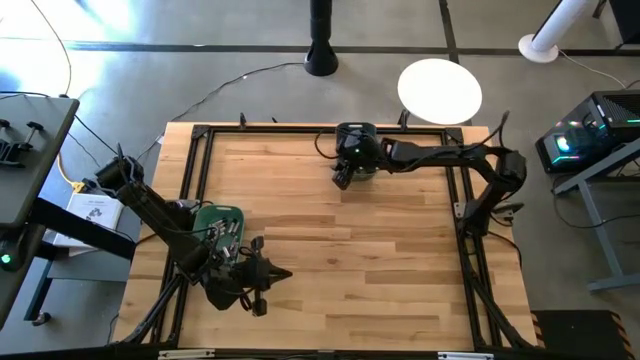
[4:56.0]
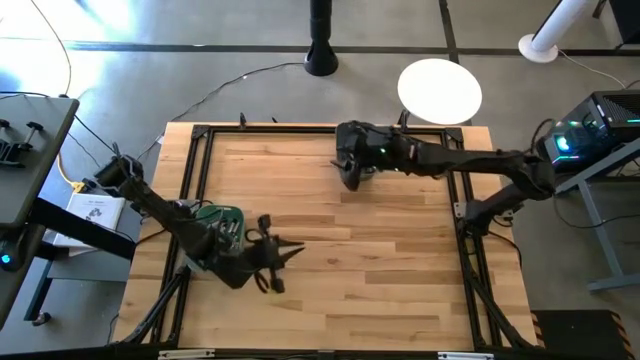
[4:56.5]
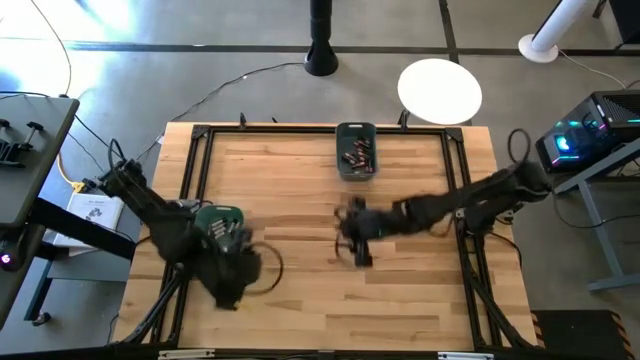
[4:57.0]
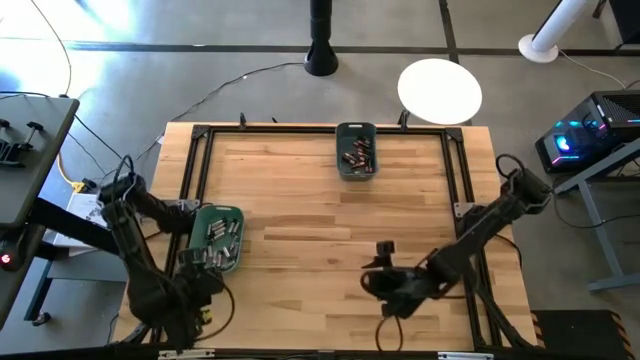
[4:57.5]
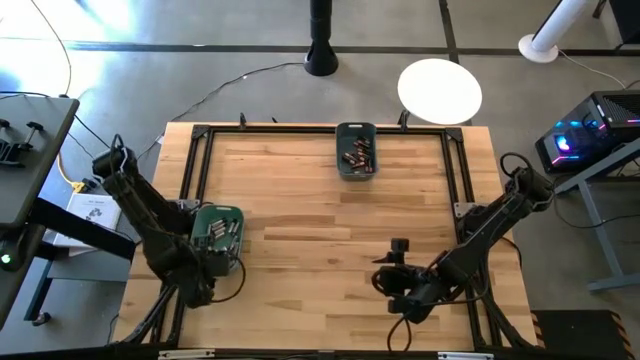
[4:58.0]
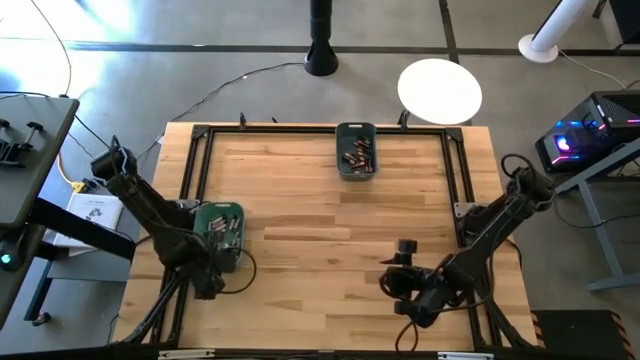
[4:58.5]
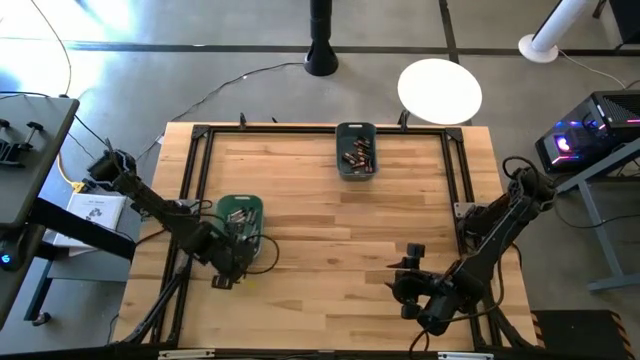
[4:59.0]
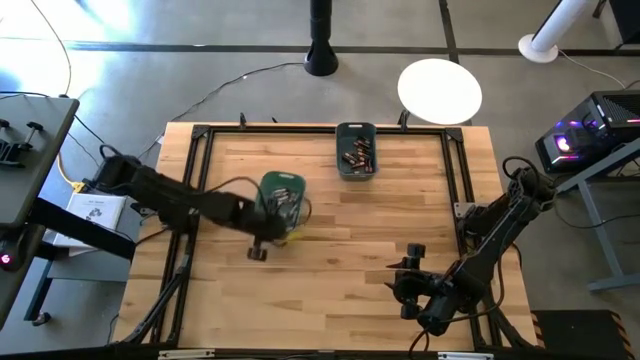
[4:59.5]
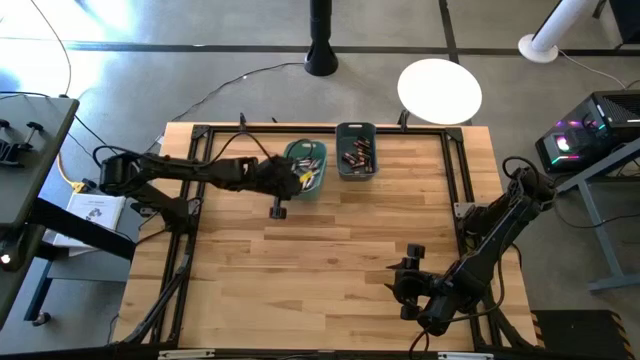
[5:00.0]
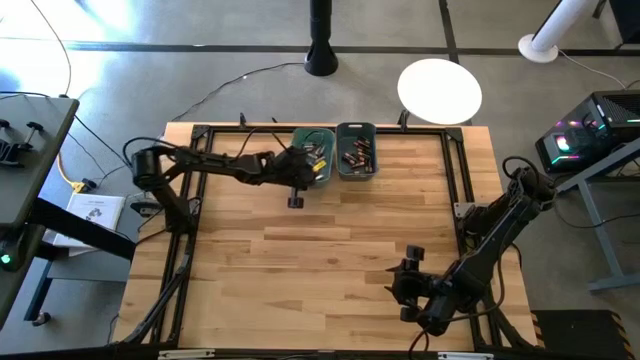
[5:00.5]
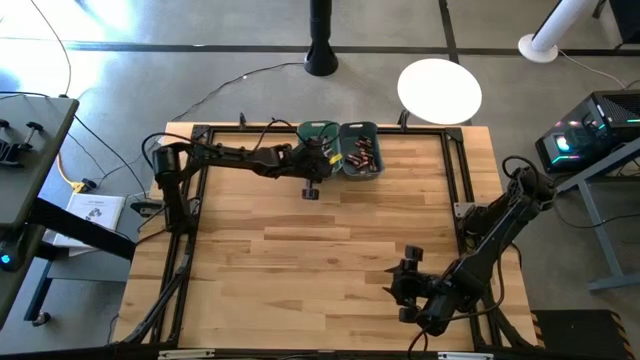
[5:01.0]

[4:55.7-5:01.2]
Task: Sort batteries
Move the green bin to the top of the table

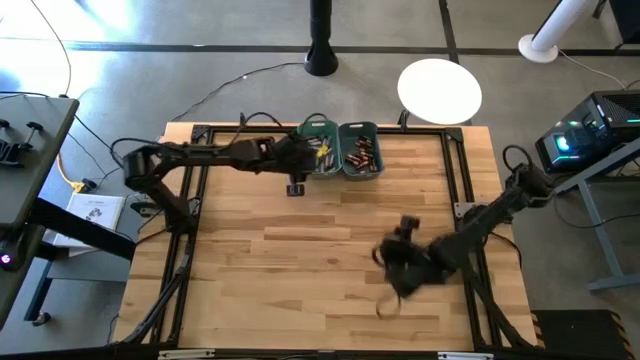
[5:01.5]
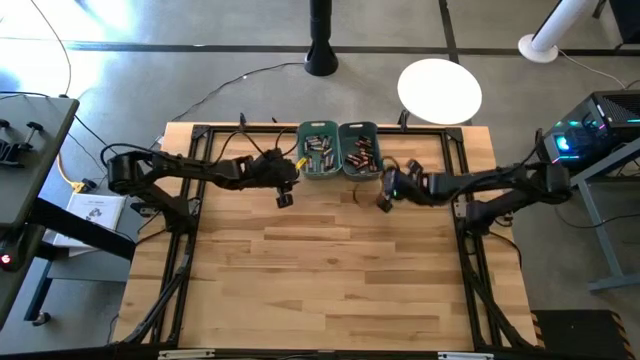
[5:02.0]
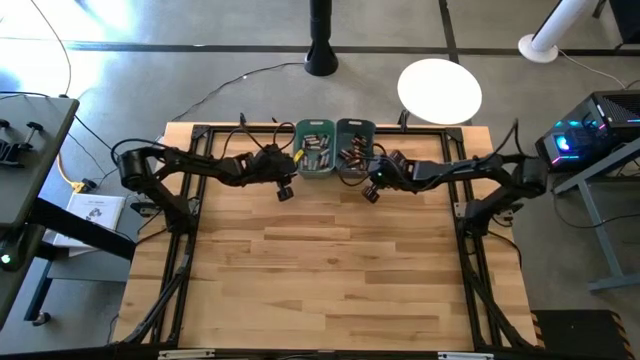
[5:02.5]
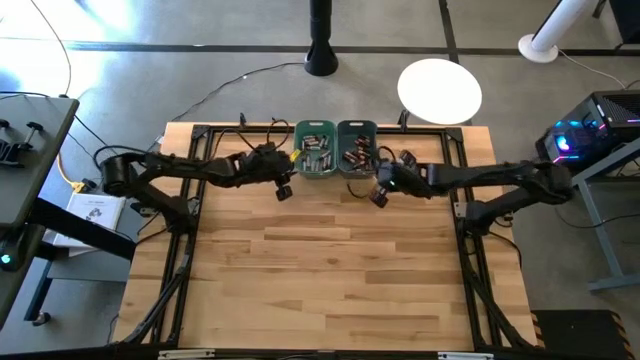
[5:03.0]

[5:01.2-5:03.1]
Adjust the bins

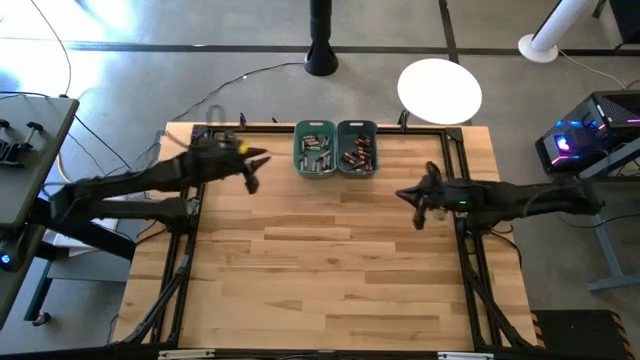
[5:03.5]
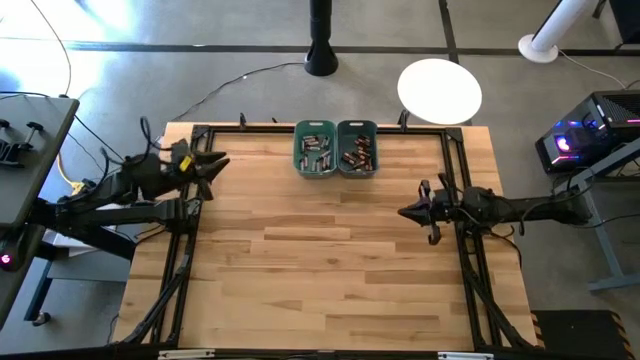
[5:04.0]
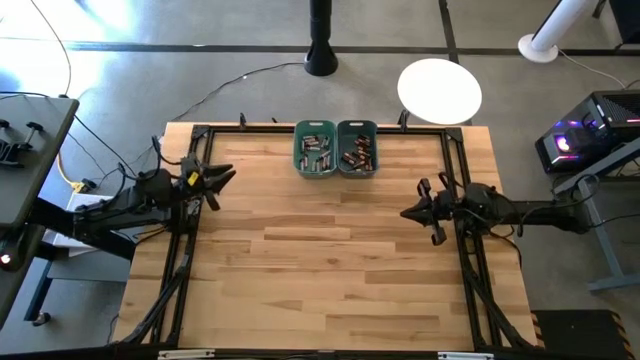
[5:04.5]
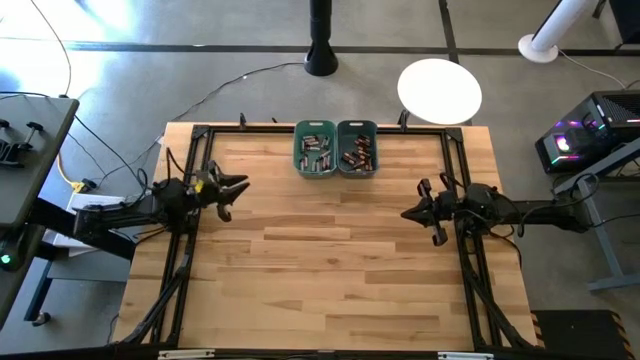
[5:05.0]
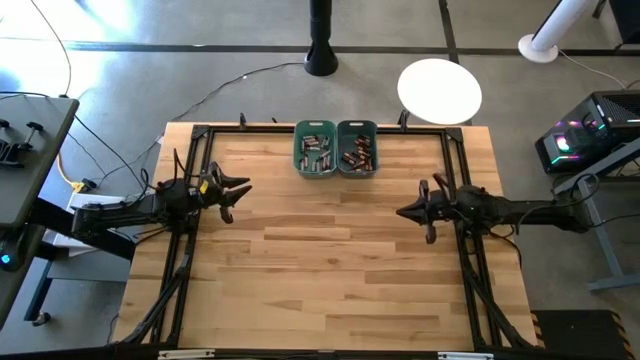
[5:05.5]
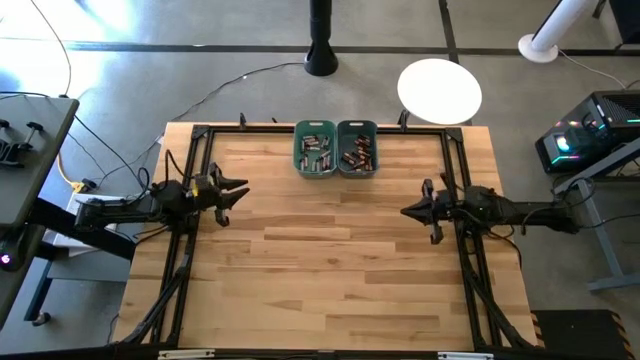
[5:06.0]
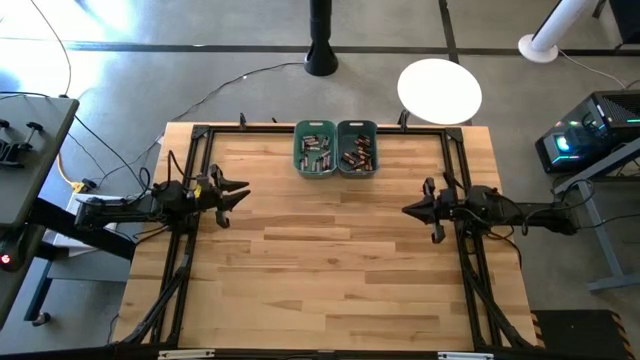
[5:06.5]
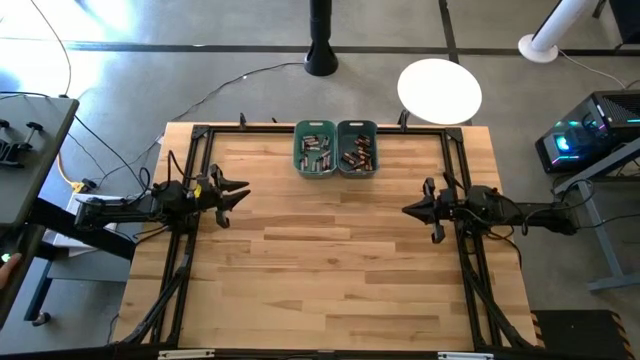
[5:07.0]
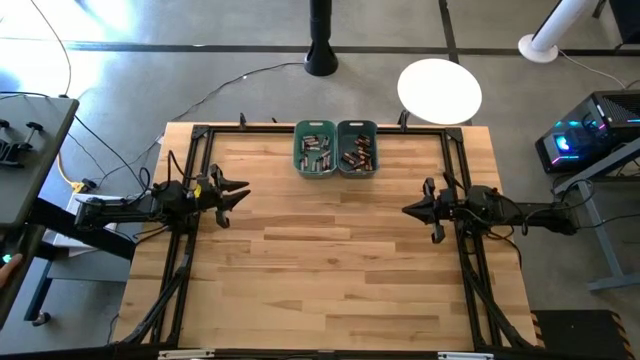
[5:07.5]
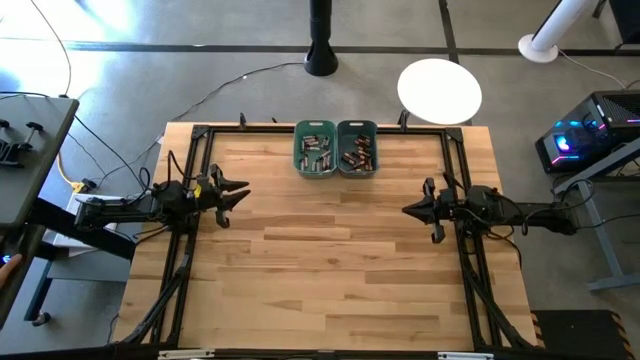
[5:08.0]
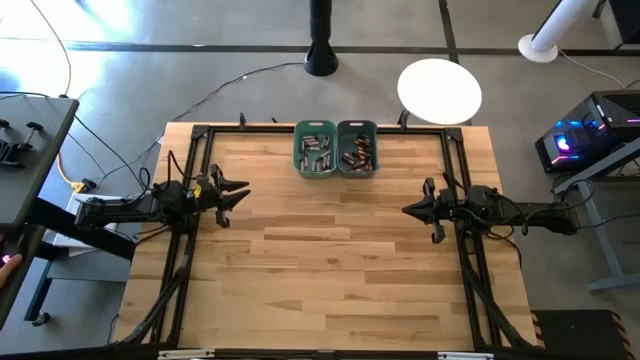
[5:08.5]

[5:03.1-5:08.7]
Return to Home Position

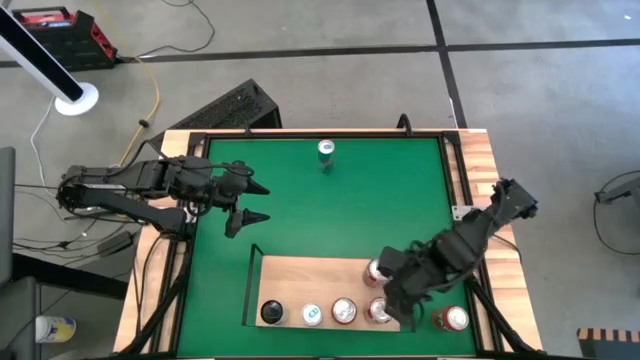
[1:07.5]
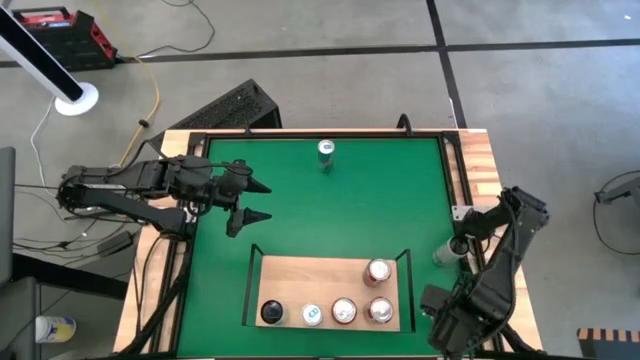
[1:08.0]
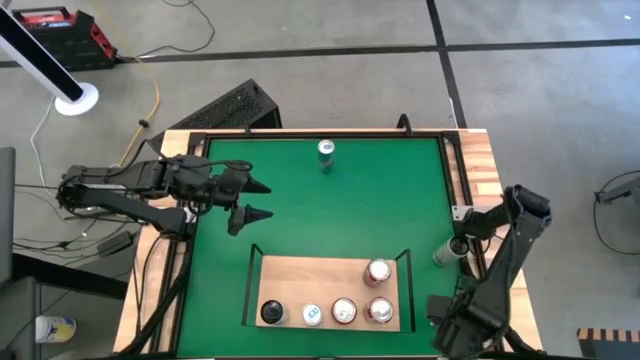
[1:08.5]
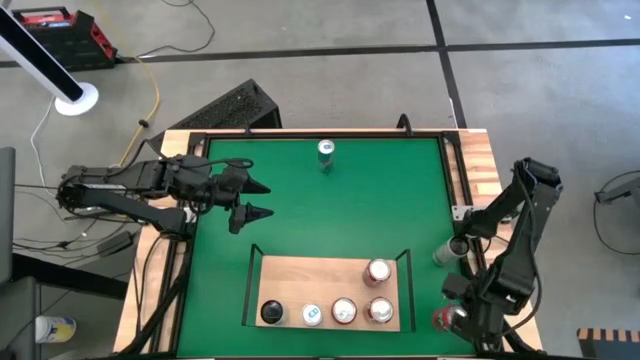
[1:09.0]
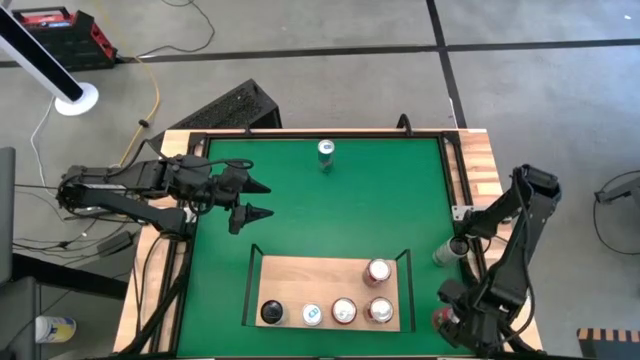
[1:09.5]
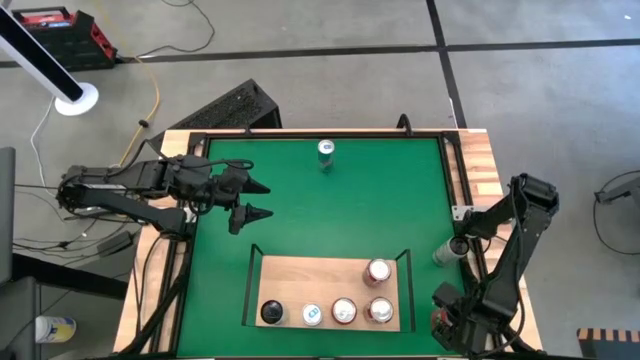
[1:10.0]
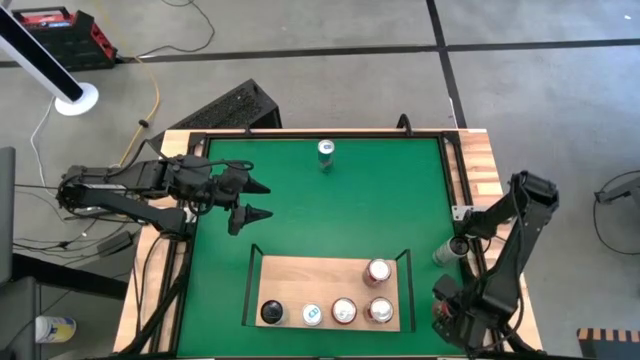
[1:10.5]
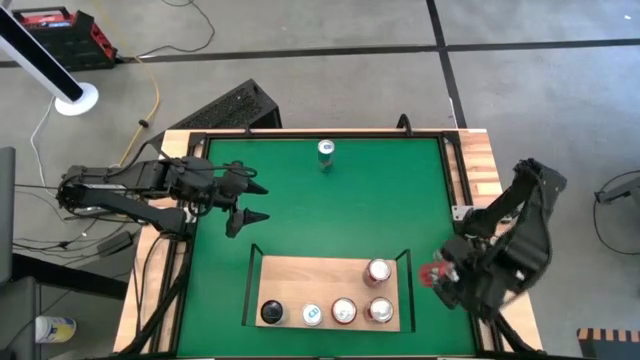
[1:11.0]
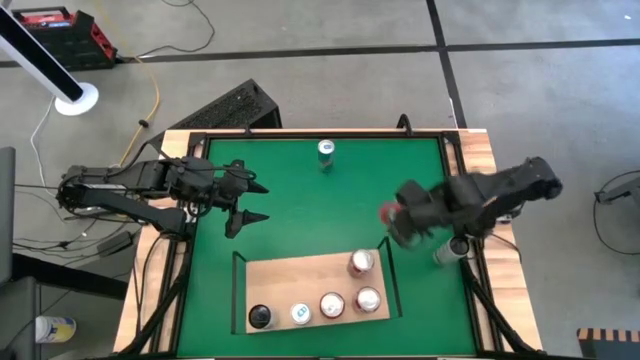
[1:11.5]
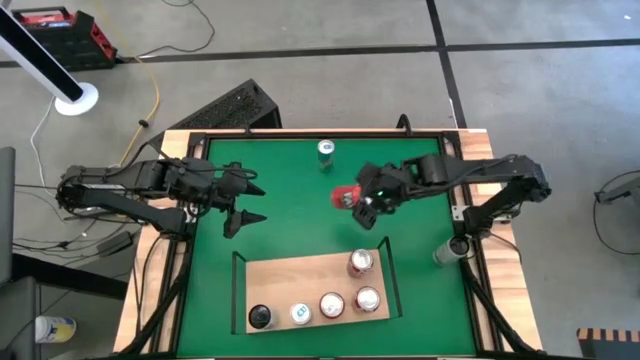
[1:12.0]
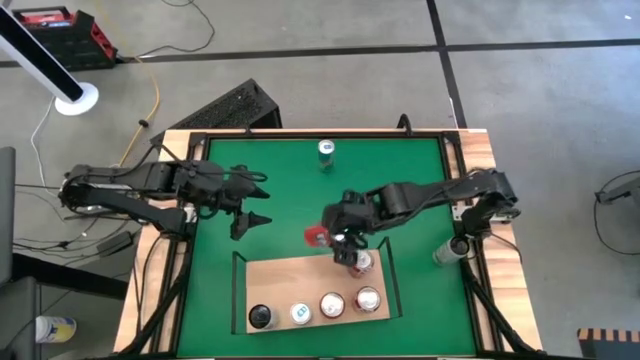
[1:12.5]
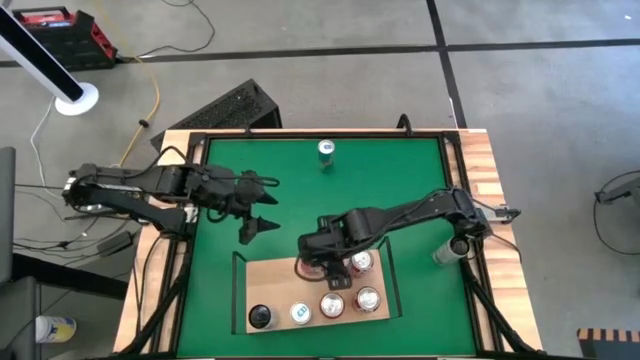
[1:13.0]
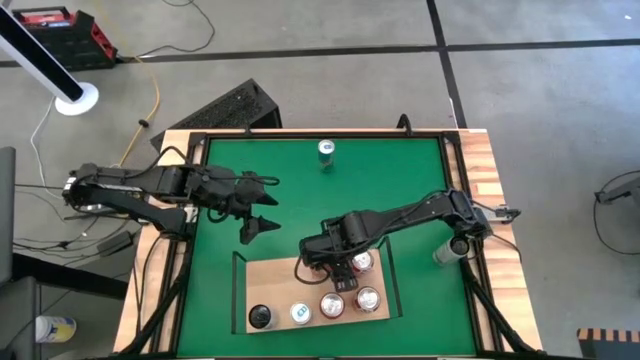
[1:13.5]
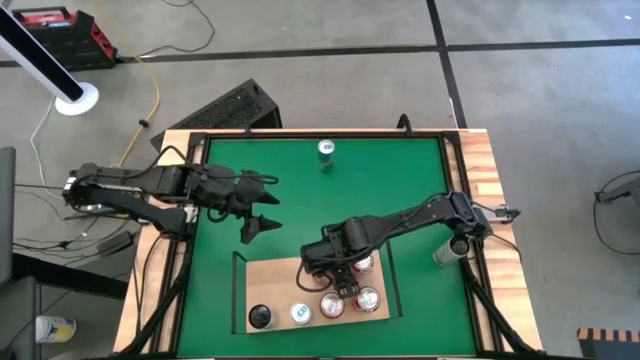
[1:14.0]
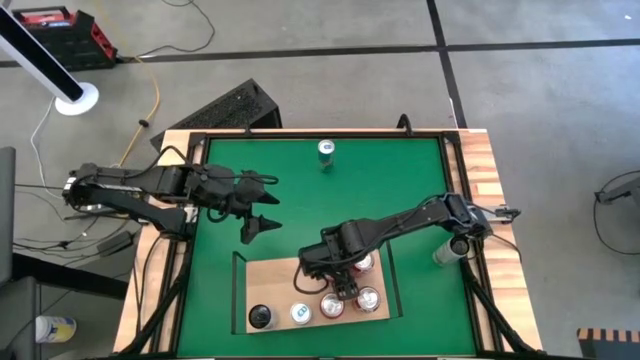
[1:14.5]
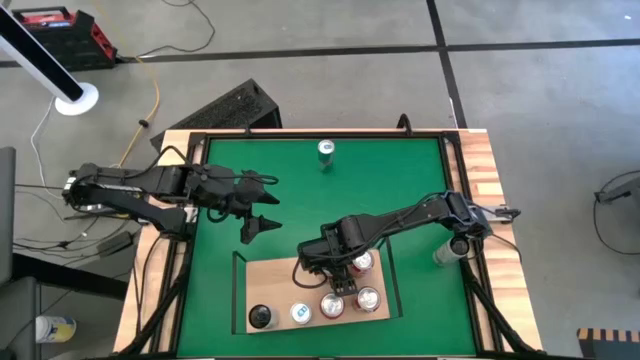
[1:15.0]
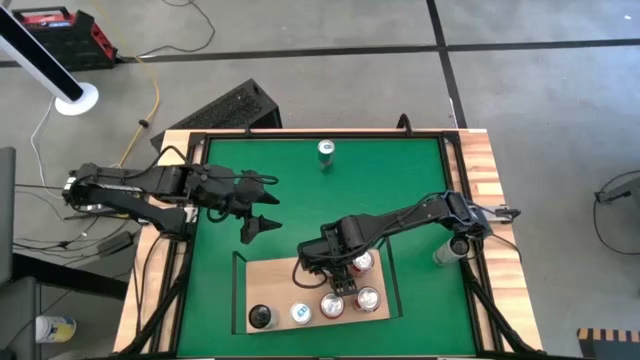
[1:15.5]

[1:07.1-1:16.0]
Task: Place canned beverage on shelf
Put the orange soda can on the shelf aligned with the other orange soda can
